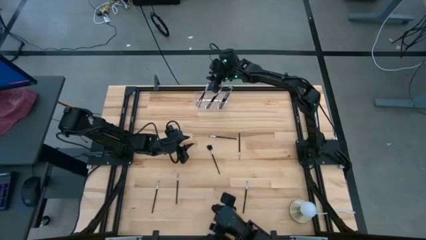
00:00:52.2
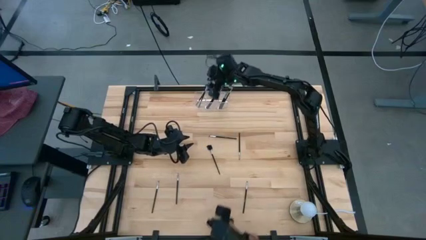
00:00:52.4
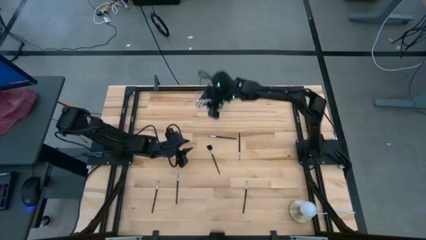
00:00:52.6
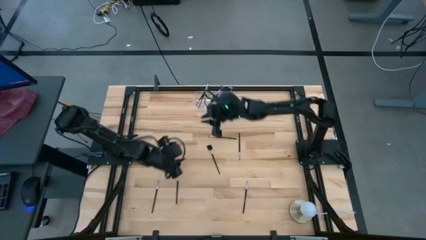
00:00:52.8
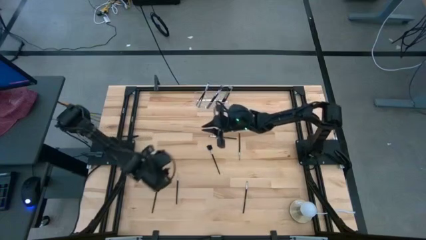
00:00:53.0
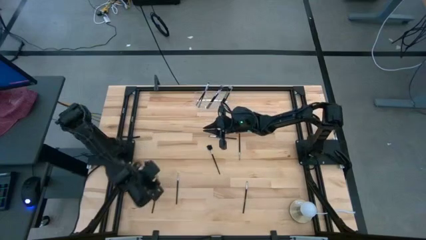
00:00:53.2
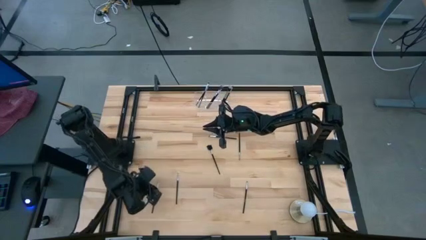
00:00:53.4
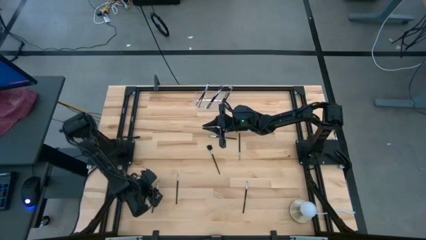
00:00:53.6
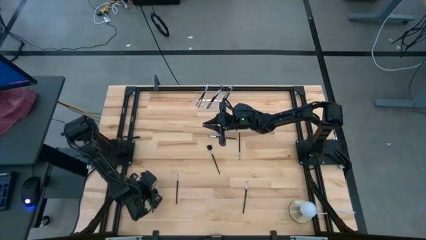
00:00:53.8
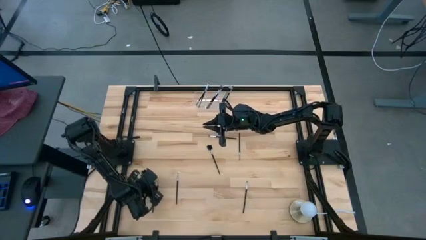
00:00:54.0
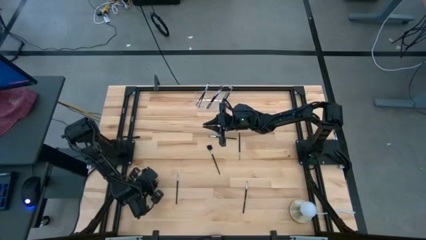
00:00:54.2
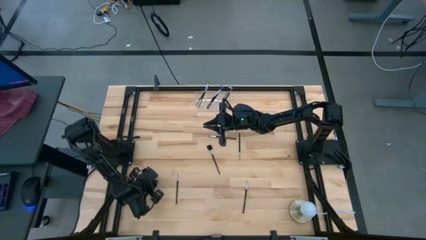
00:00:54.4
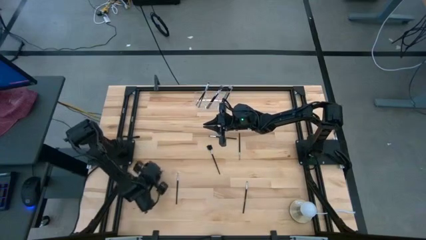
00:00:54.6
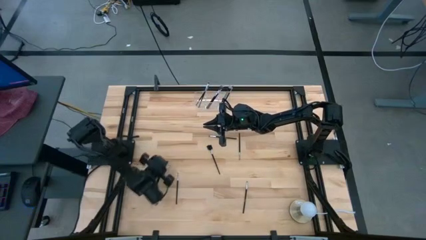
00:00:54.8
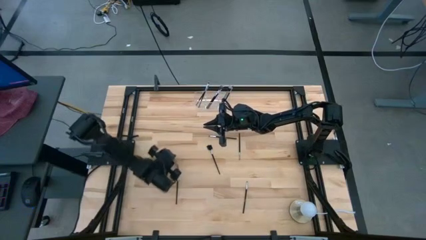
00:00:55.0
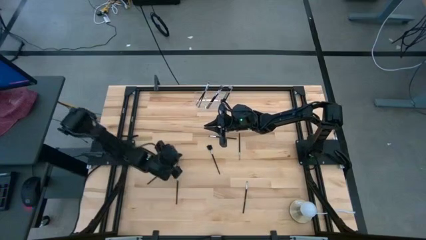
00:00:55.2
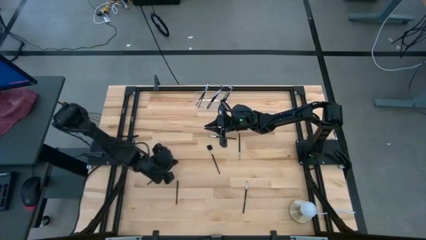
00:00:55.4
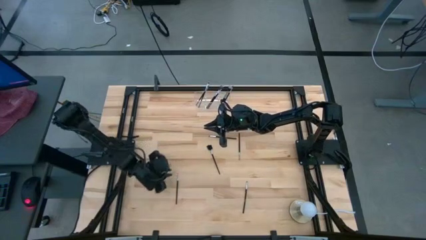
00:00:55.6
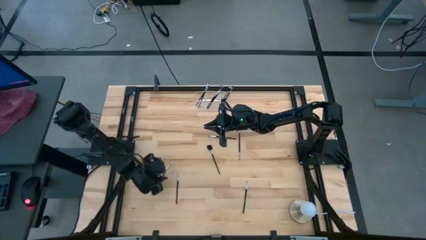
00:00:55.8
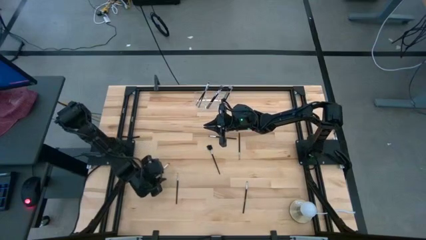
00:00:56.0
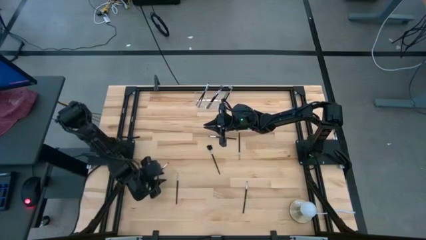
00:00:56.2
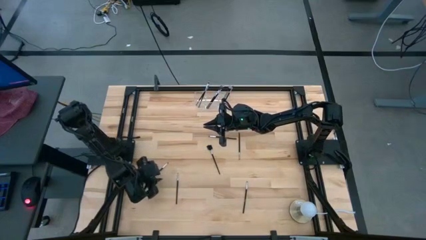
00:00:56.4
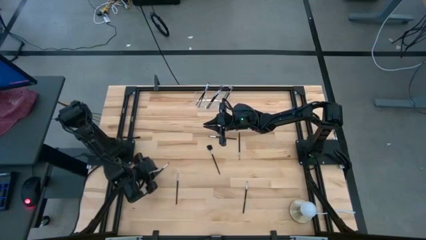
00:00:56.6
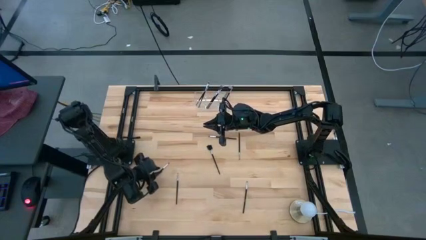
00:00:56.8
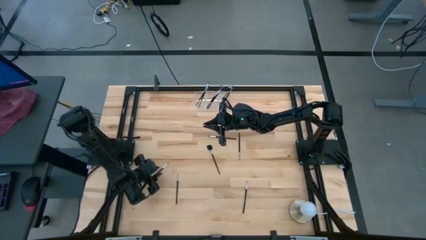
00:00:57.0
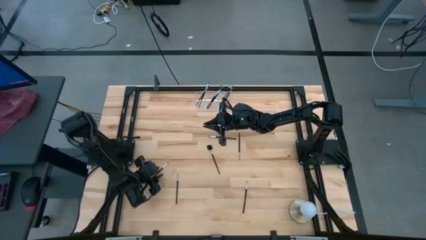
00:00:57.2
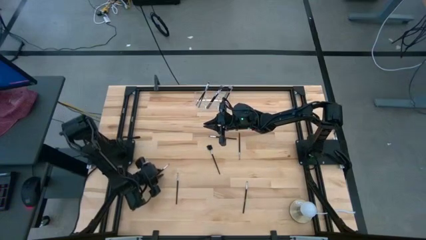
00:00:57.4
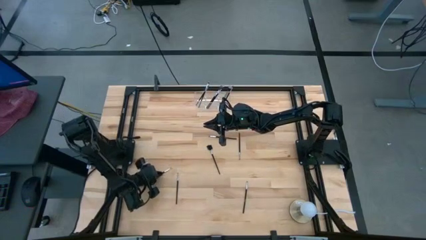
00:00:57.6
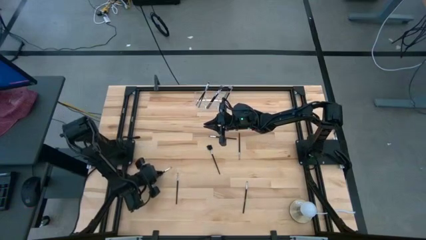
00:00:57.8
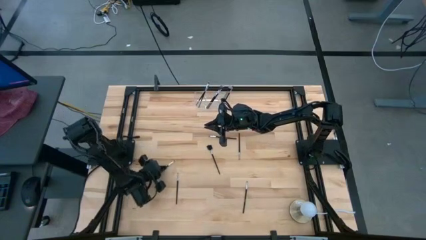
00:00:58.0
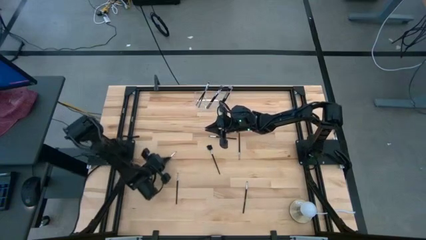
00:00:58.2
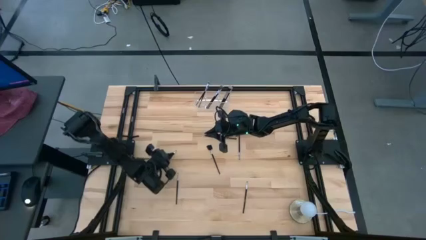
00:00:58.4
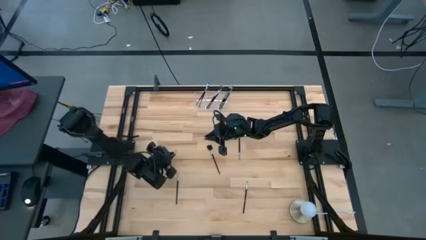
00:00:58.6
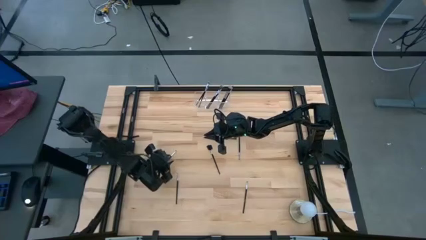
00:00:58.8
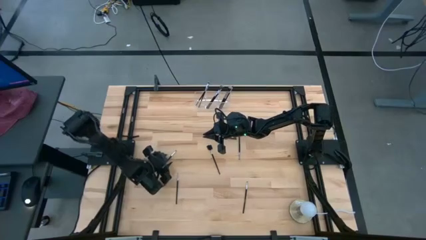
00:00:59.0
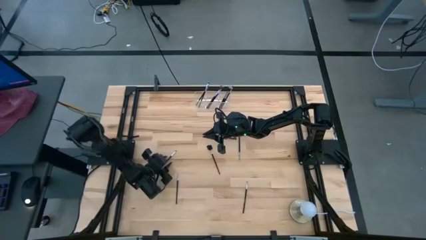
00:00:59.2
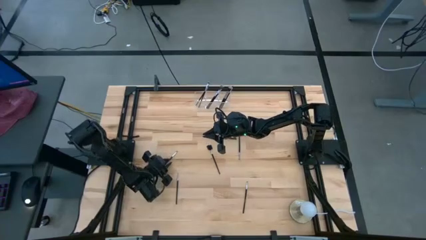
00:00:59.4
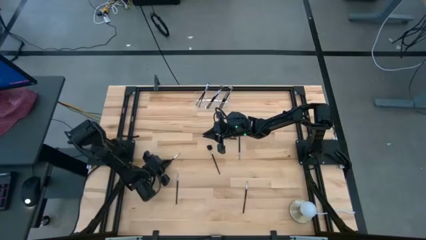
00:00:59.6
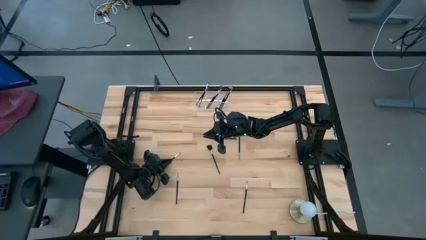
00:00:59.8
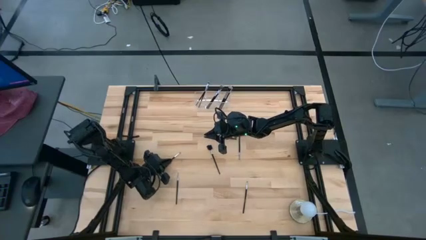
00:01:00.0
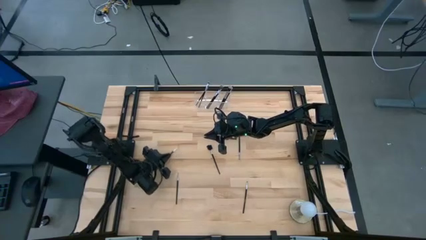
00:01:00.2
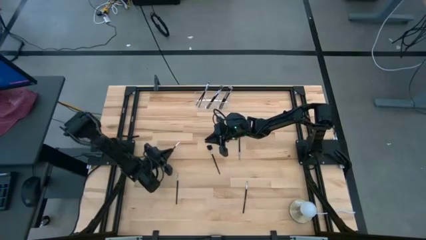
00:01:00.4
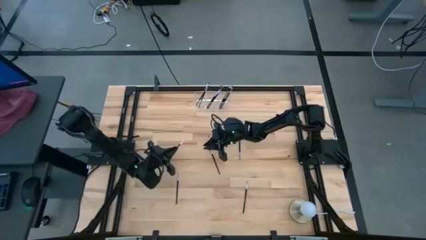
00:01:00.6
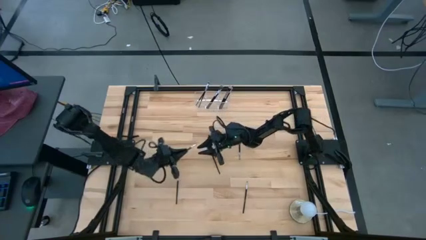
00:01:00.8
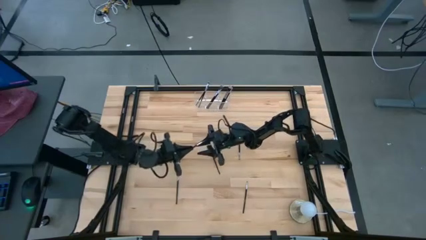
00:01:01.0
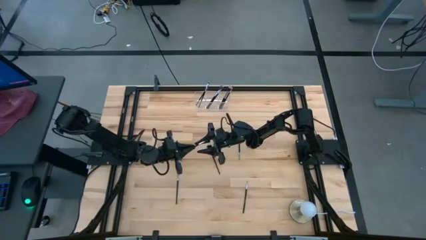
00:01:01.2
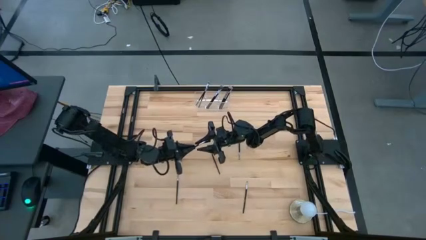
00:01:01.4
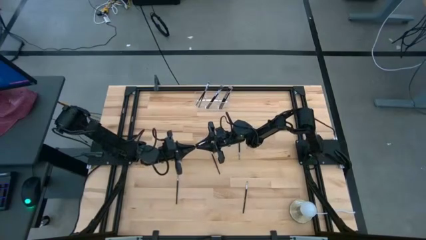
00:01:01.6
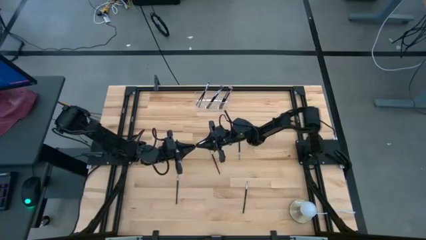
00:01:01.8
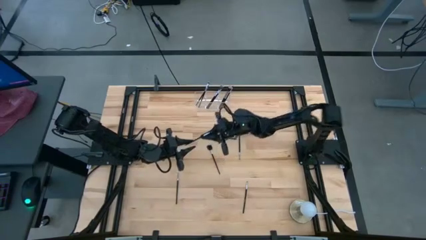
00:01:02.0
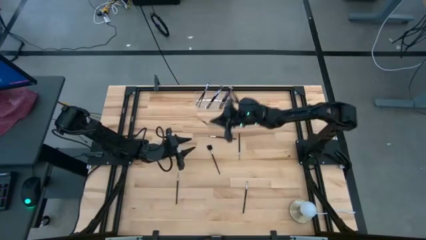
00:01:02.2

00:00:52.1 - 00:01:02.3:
Task: Put items in baskets/containers
Put the black eyeshadow brush into the transparent organizer

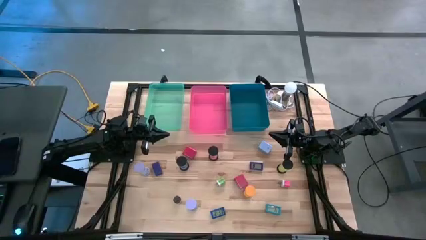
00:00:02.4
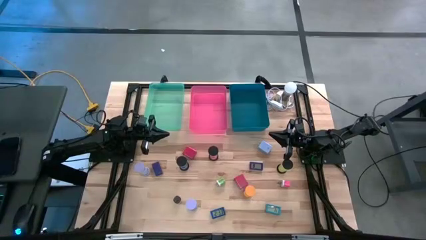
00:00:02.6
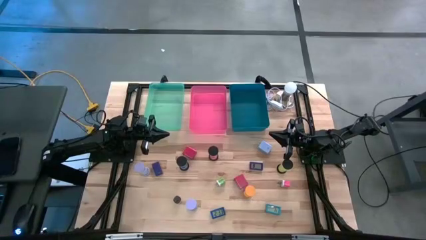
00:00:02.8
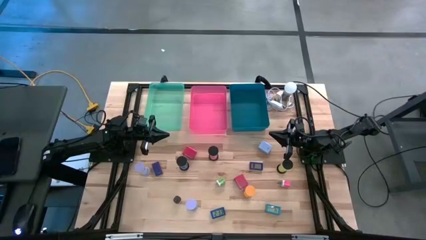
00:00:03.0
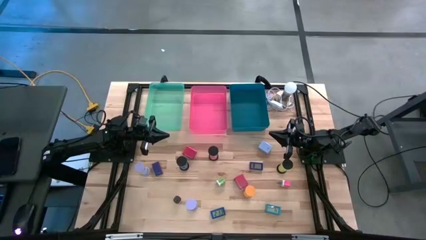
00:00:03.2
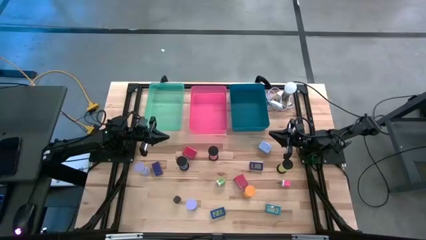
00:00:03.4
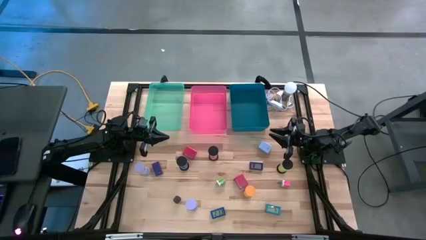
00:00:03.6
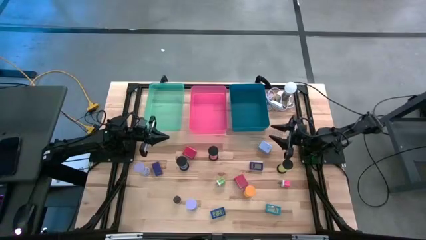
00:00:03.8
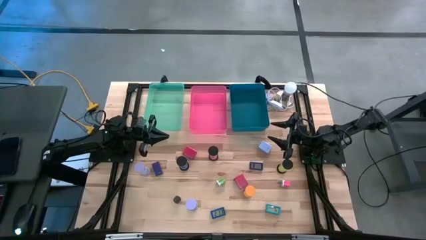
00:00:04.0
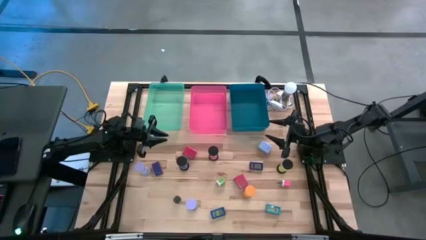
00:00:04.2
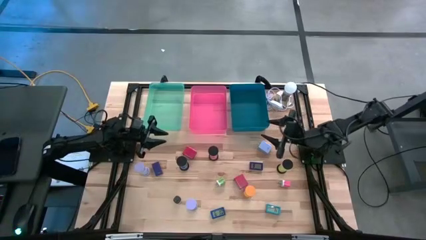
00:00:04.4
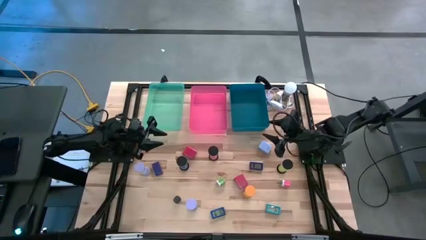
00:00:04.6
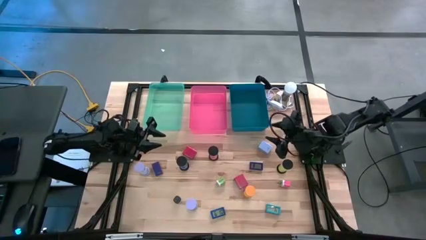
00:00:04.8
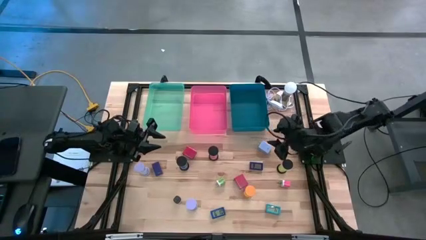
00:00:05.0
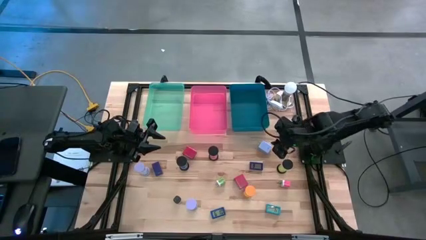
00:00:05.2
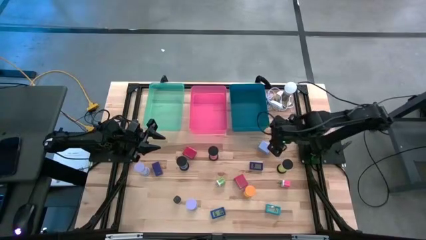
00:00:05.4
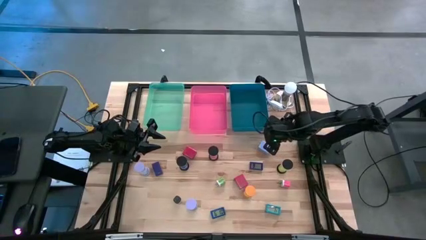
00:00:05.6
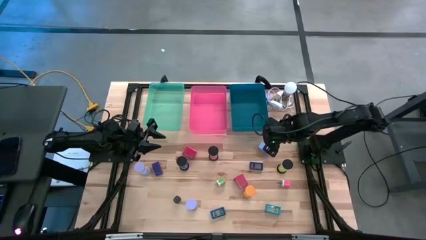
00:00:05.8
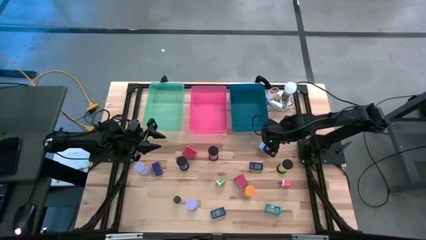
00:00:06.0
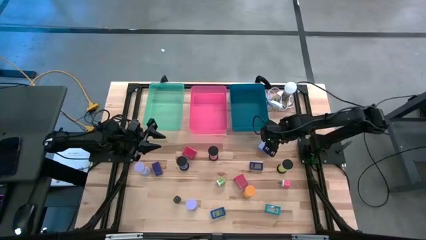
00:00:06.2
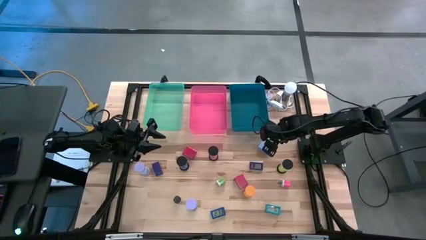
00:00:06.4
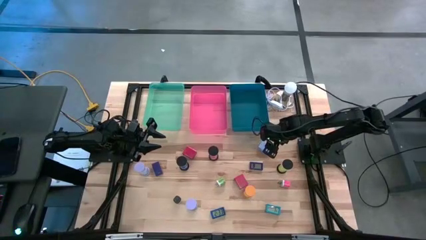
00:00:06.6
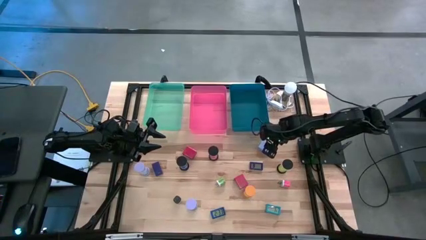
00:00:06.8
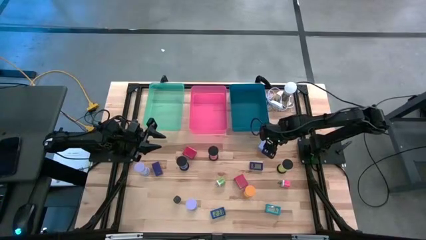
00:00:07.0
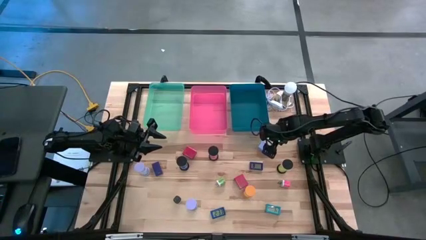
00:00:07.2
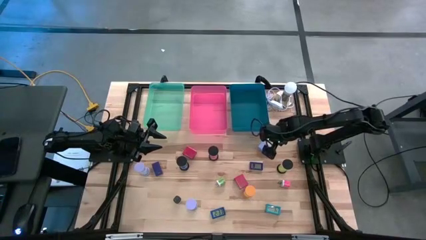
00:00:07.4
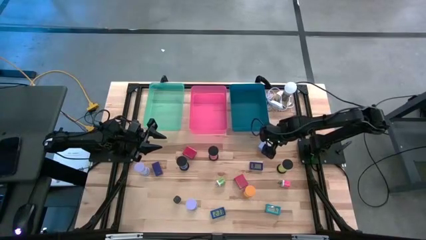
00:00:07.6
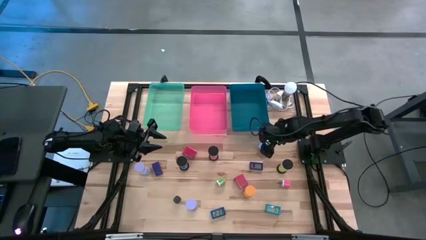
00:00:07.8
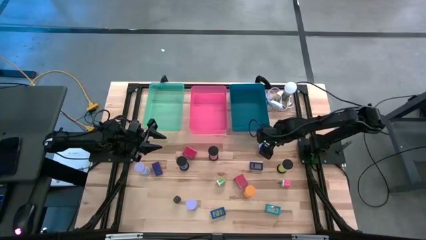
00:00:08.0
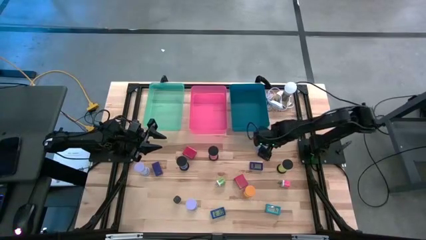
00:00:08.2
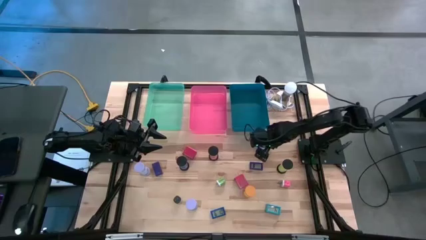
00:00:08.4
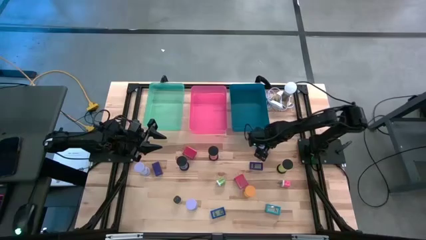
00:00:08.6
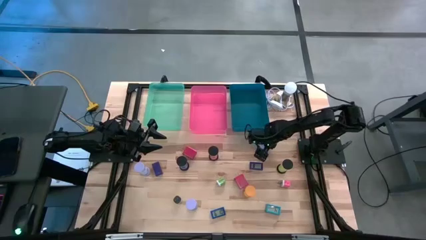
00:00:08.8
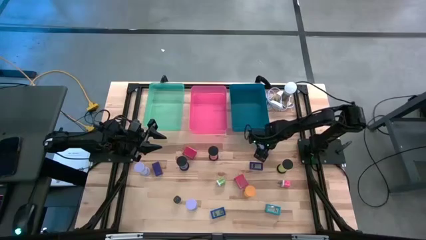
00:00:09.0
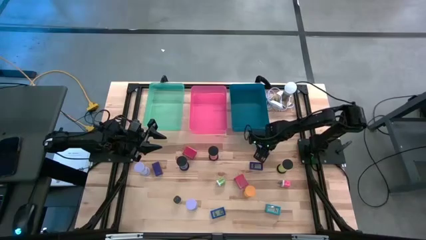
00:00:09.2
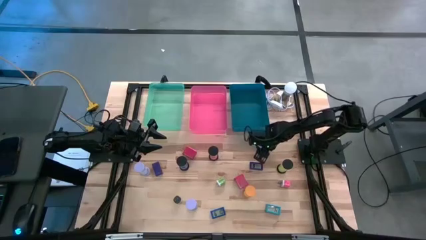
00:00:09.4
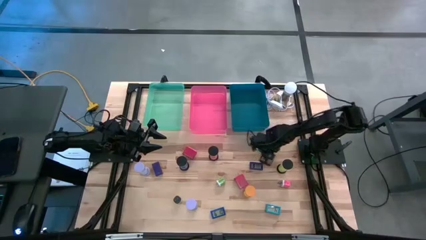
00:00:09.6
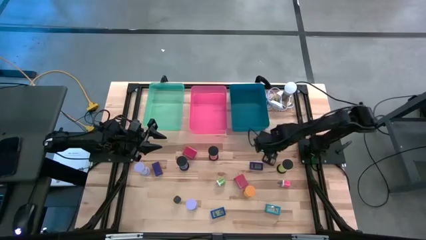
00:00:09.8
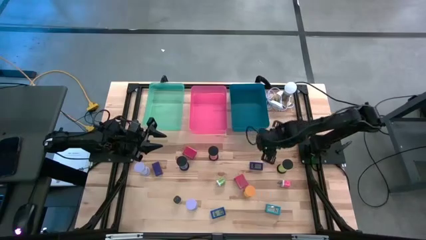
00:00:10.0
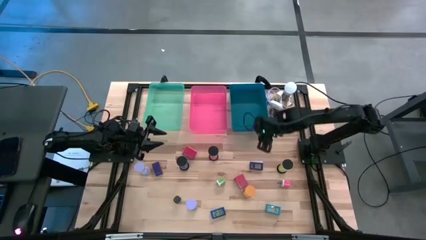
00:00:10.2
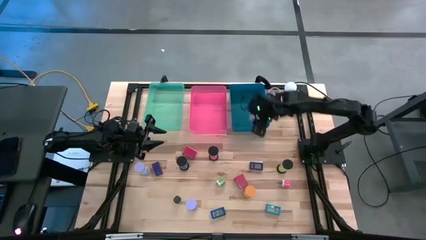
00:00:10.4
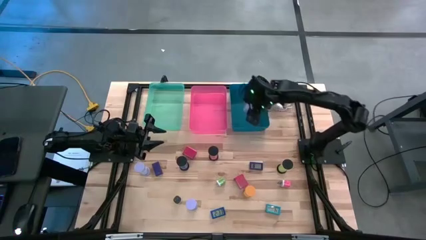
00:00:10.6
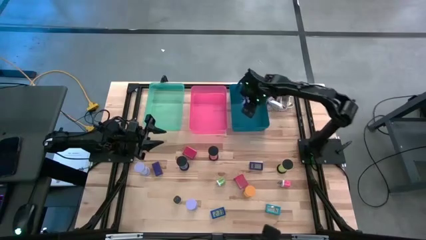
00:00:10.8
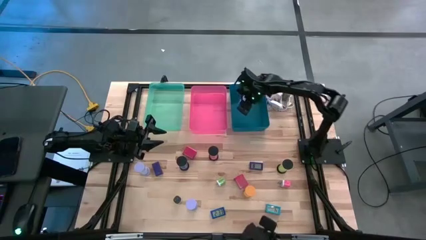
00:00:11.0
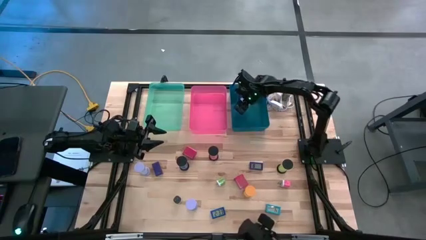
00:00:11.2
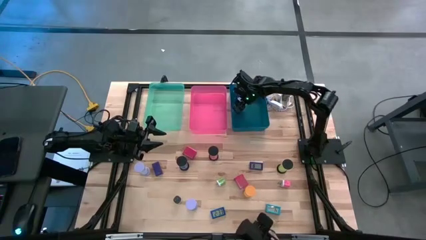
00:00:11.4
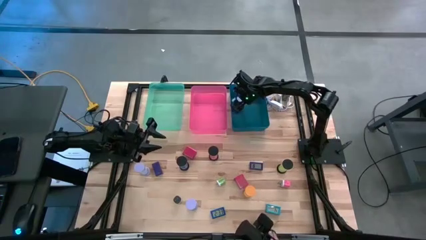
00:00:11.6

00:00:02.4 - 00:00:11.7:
Task: Pick & Place Office items
Put the top white charger adapter into the blue bin
